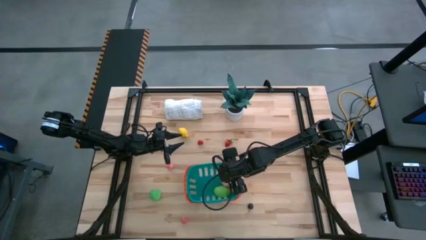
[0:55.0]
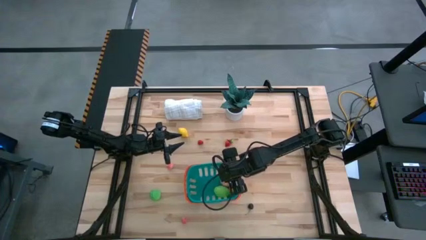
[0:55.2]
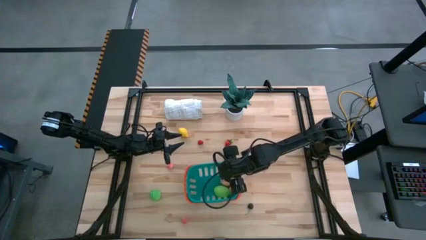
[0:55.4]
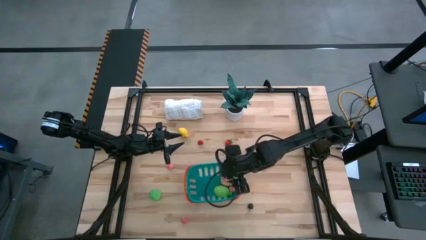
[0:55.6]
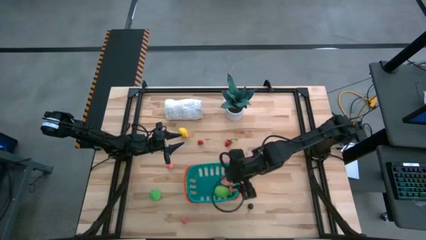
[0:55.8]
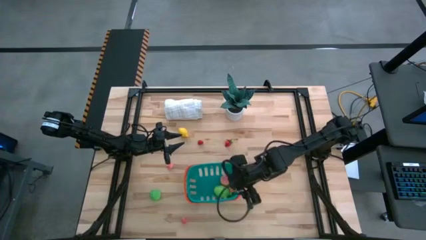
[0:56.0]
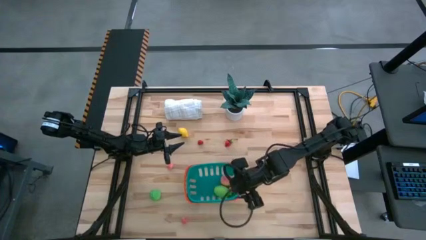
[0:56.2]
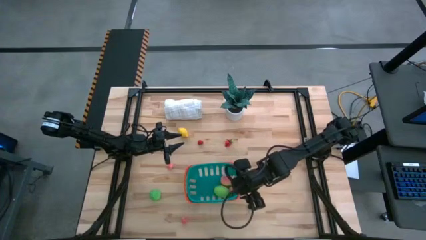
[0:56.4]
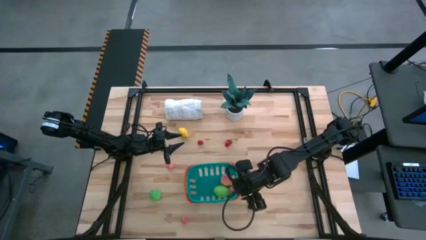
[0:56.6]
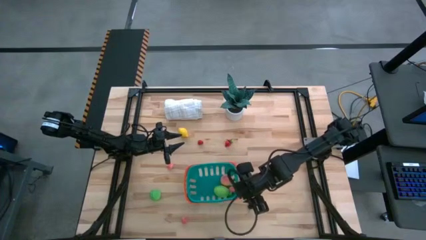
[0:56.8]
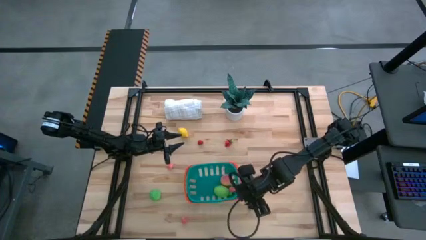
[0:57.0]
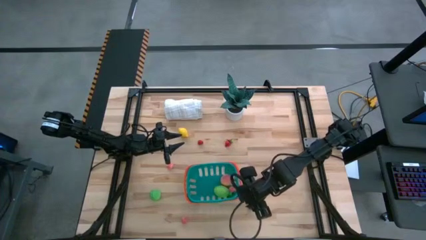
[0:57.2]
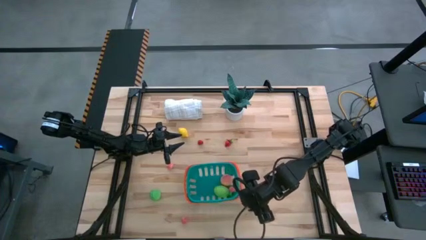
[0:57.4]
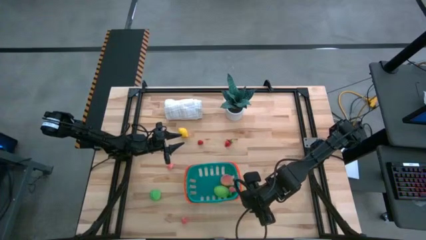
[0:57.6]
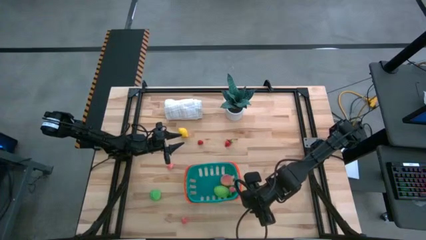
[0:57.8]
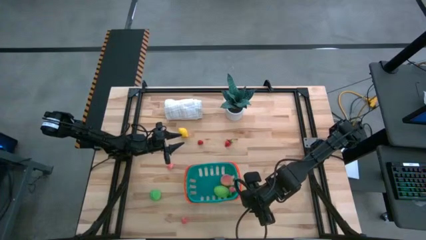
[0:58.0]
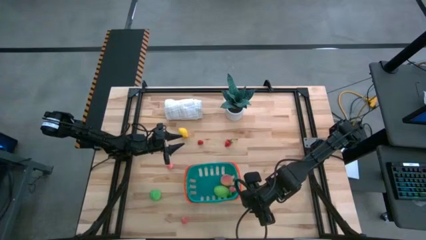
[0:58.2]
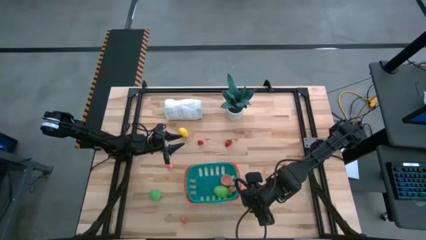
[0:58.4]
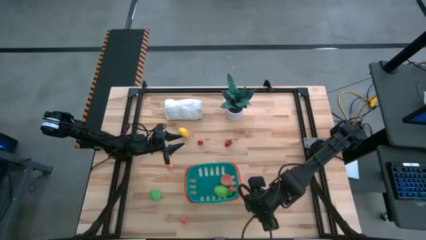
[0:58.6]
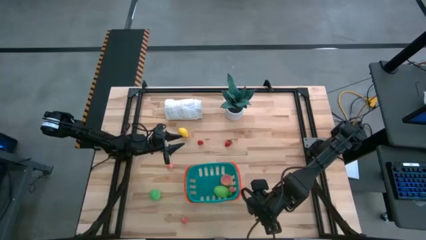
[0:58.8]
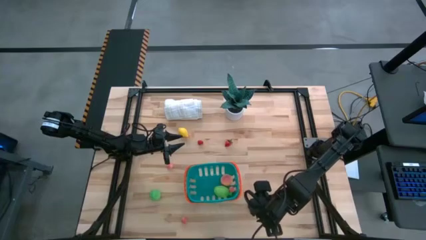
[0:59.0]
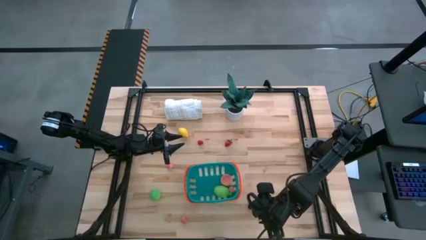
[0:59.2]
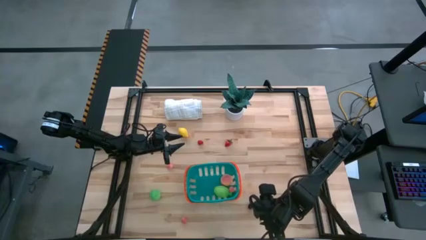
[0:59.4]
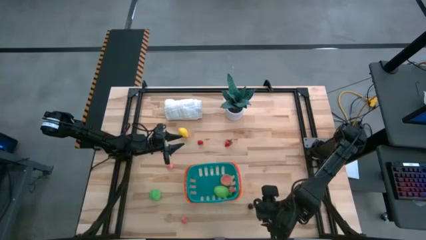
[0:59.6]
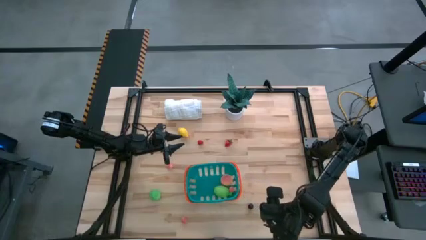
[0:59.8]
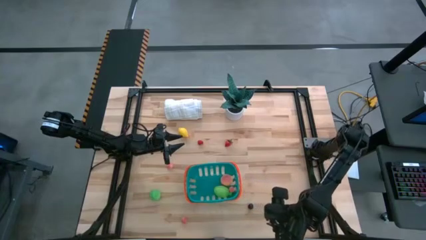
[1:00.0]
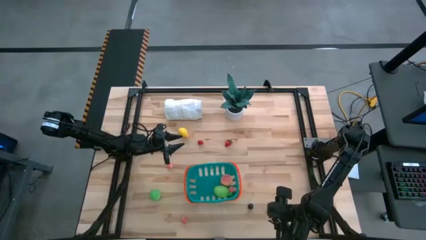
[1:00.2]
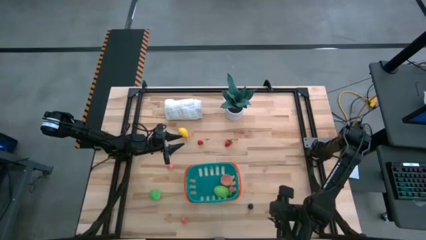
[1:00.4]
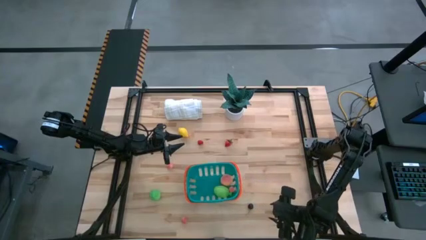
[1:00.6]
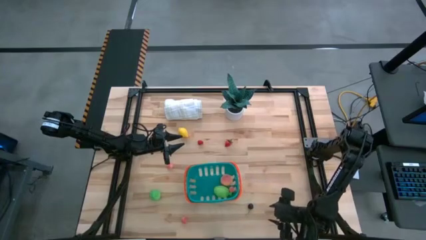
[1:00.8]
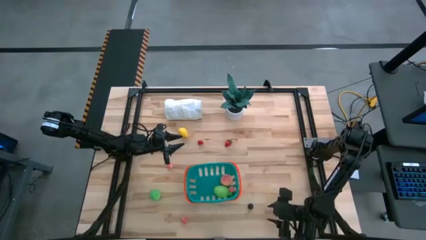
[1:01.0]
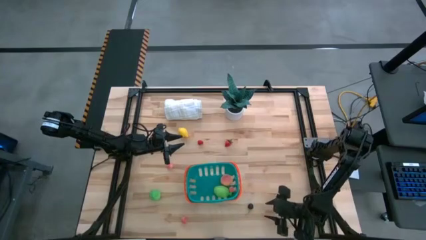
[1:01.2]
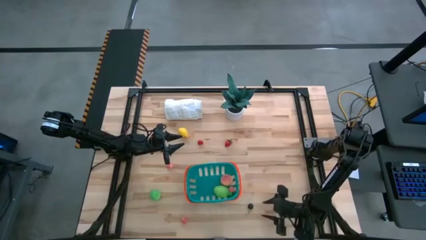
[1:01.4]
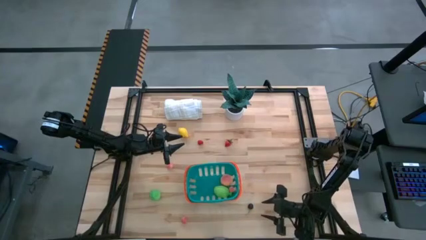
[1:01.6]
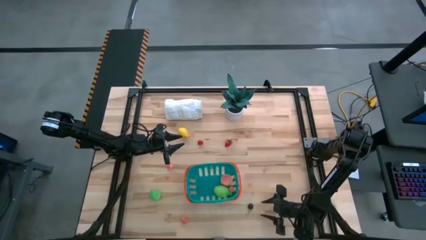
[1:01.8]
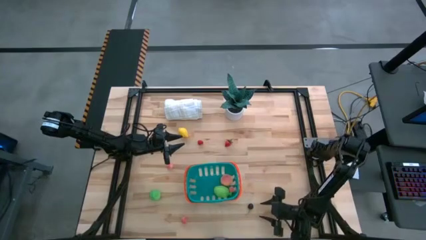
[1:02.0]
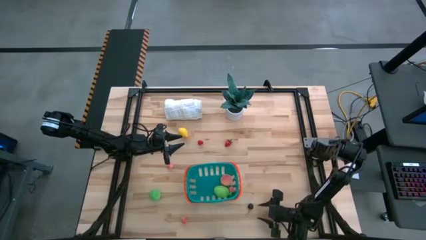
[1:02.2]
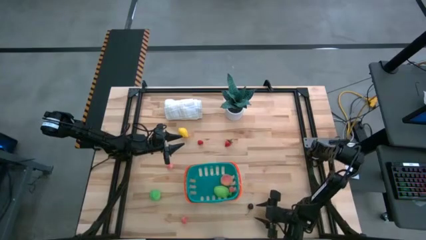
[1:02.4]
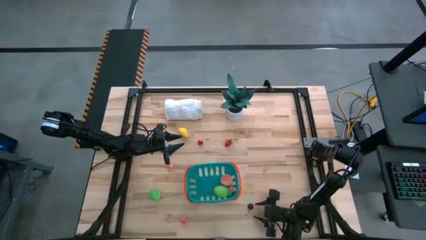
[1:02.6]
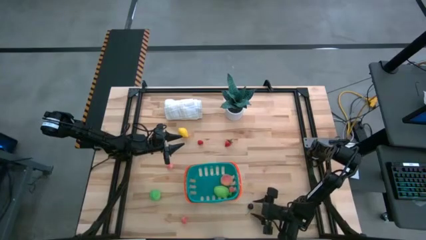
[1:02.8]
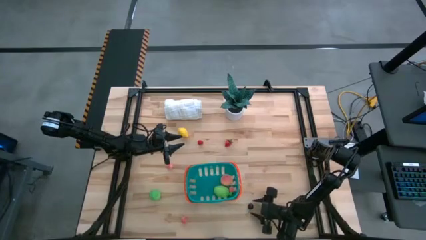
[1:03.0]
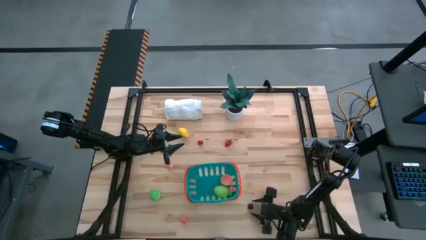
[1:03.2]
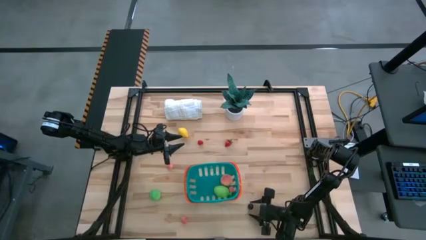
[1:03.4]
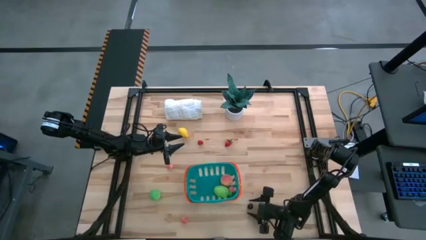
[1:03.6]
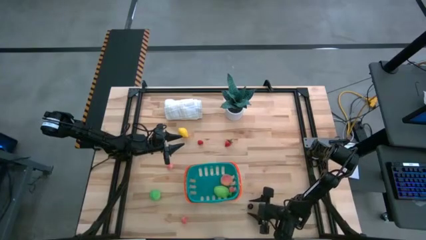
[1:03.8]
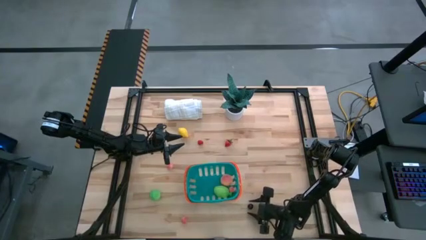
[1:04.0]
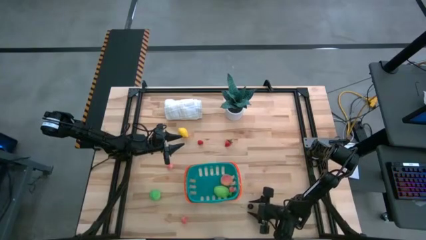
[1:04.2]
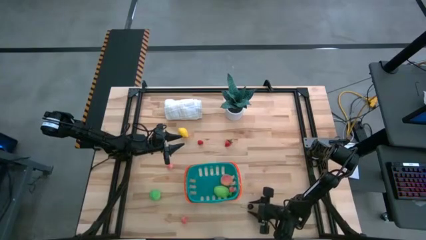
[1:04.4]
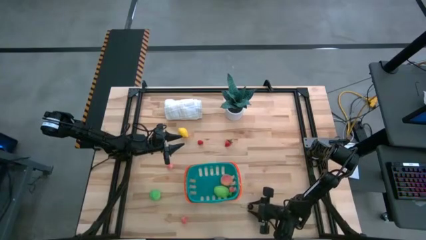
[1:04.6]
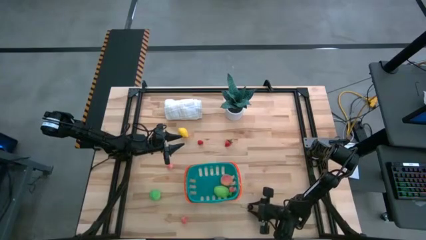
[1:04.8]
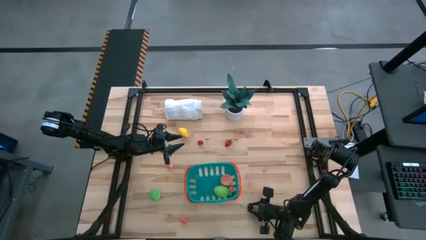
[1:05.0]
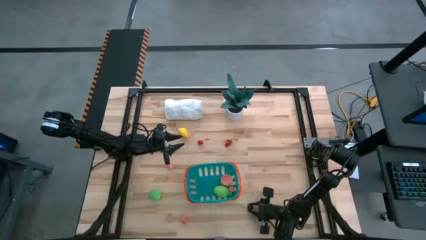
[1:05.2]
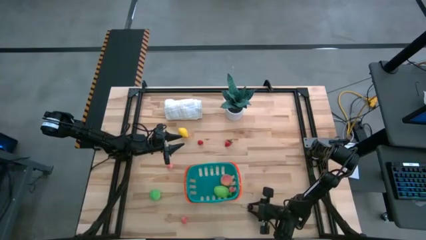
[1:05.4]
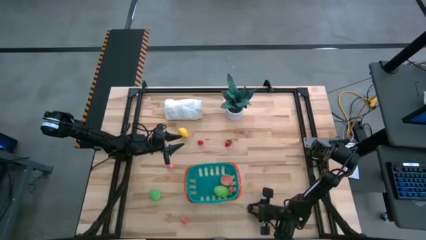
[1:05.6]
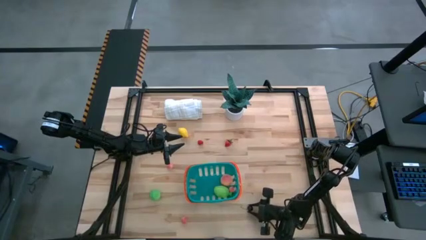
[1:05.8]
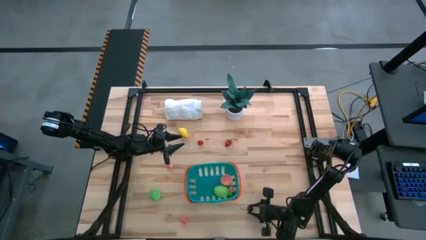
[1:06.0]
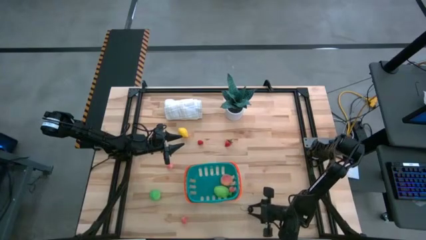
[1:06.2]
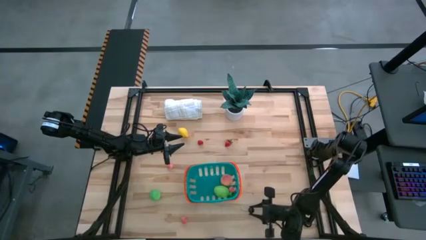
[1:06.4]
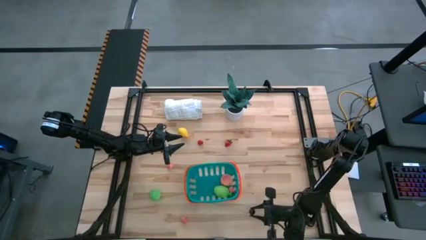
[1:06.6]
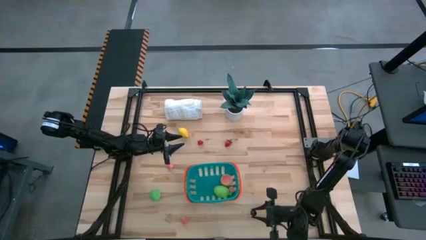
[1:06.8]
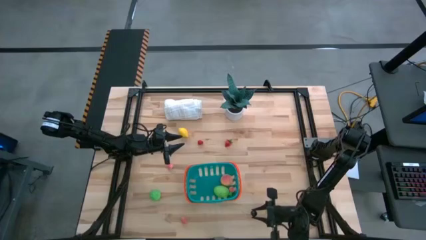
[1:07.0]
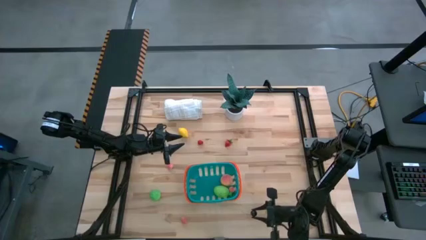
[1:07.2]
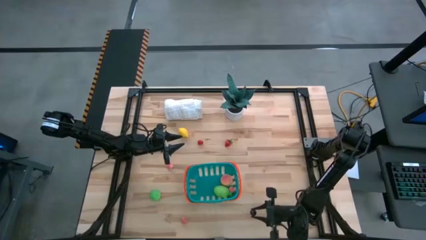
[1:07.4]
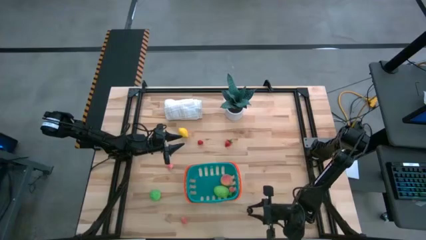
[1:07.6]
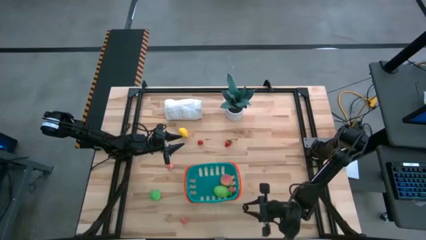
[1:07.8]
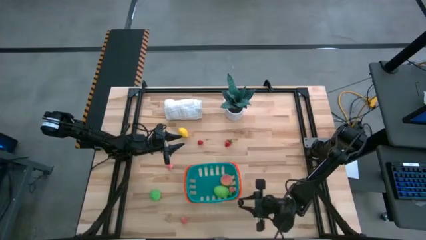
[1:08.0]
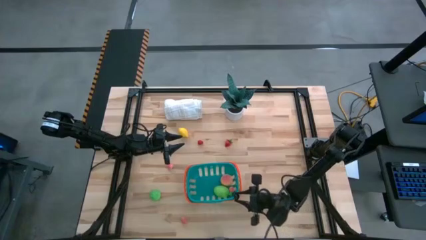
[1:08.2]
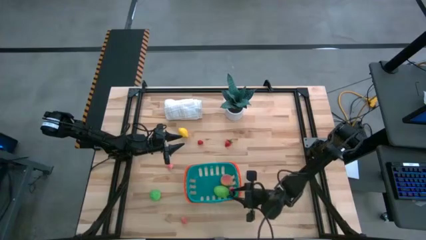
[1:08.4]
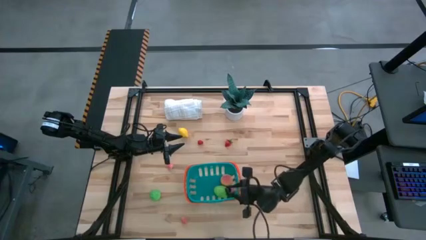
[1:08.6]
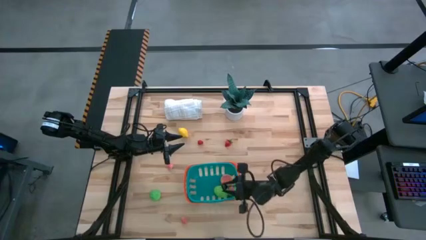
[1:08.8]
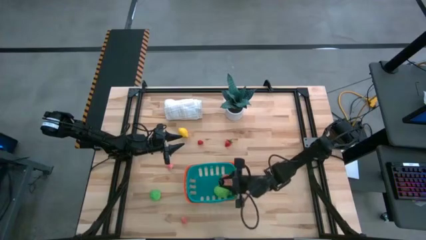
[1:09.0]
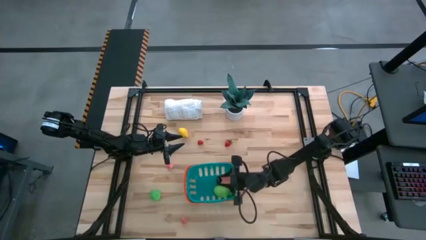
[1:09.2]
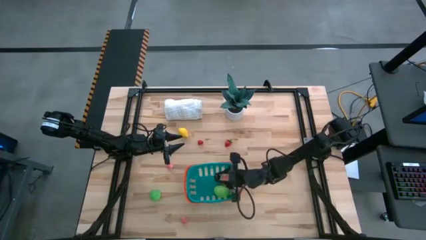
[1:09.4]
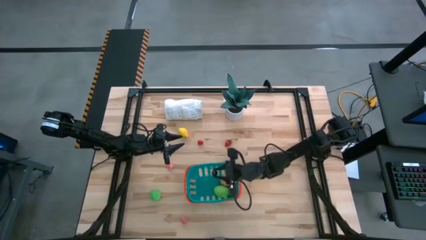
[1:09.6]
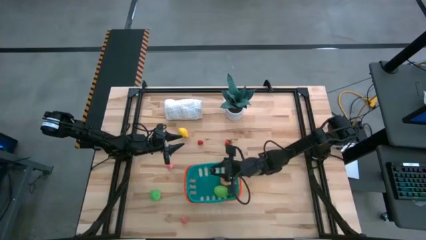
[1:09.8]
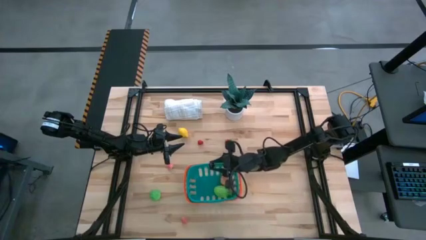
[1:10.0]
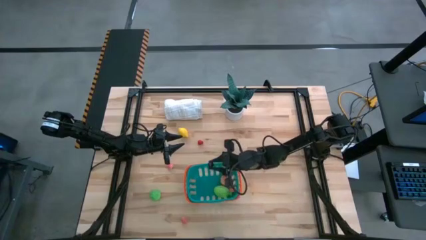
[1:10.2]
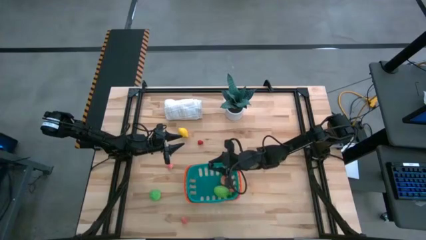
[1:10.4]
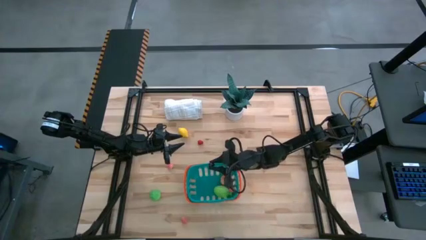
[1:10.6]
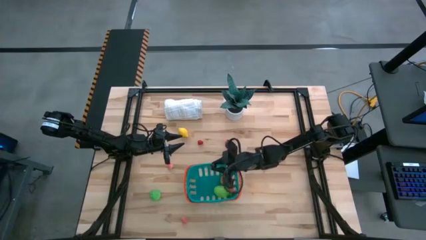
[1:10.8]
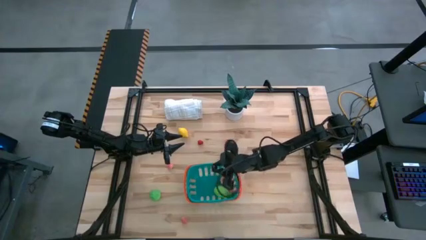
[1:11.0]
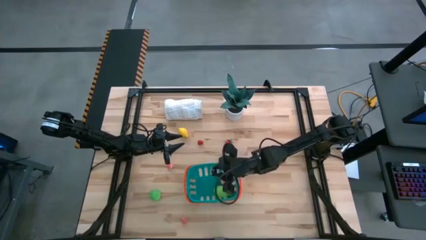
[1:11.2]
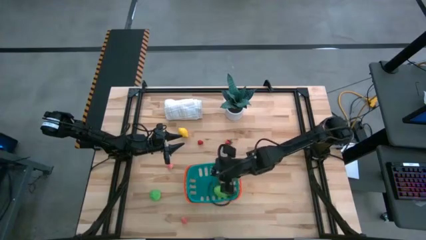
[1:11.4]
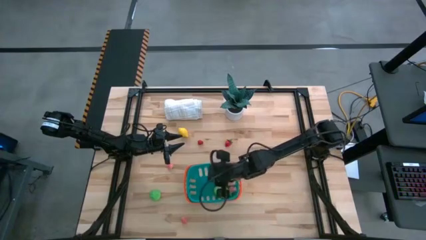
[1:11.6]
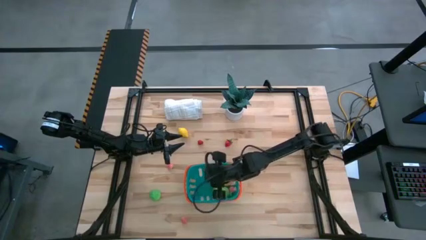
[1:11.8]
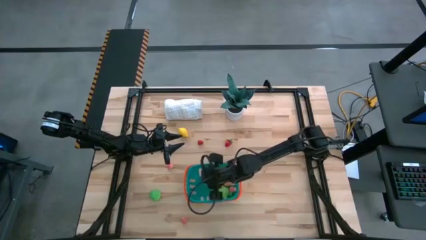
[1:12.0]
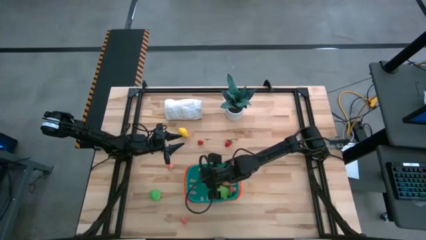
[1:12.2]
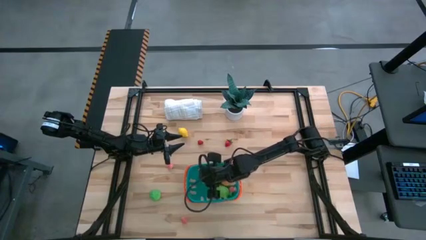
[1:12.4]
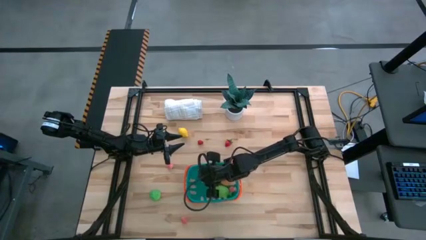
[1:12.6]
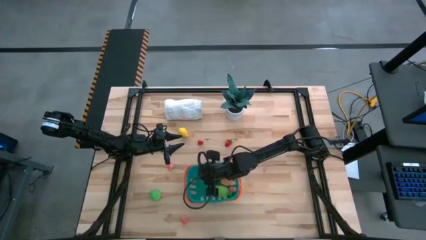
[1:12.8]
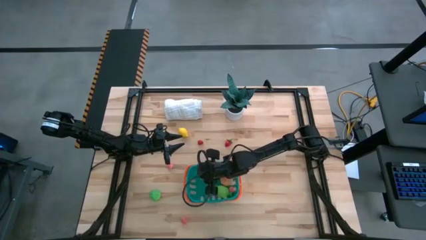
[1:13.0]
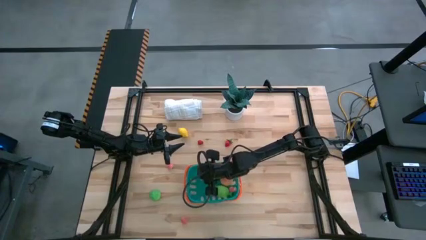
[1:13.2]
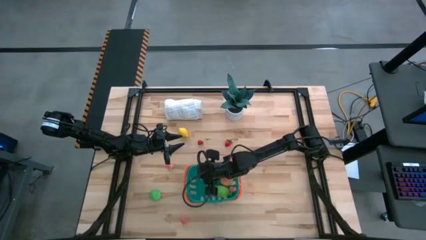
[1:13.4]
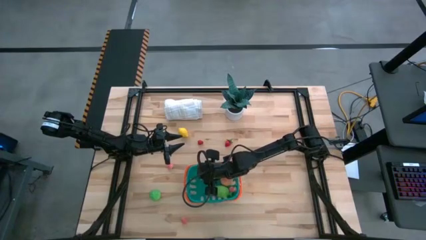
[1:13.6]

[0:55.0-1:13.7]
Task: Pick and placing Produce into tupperware
Put the black cherry into the blue bin
